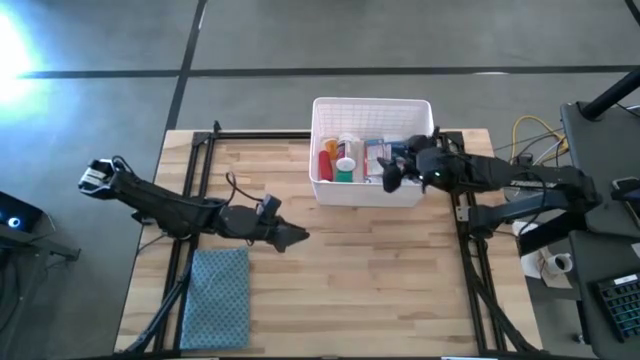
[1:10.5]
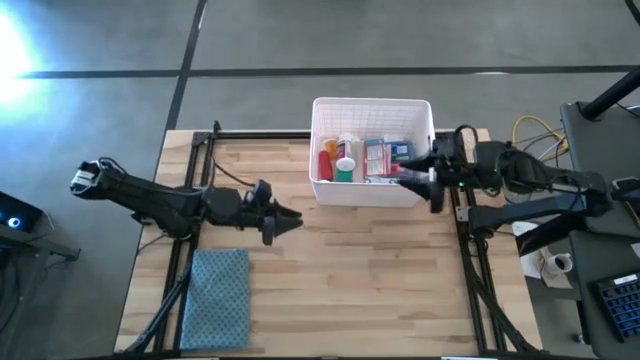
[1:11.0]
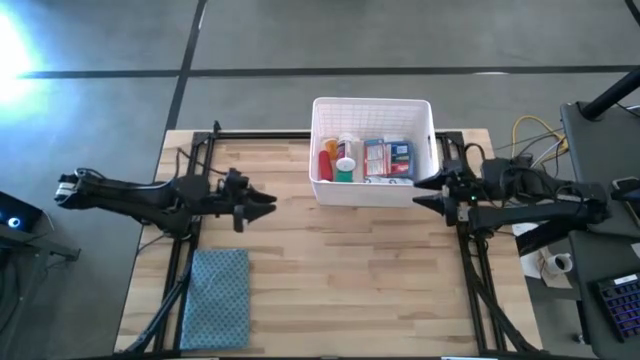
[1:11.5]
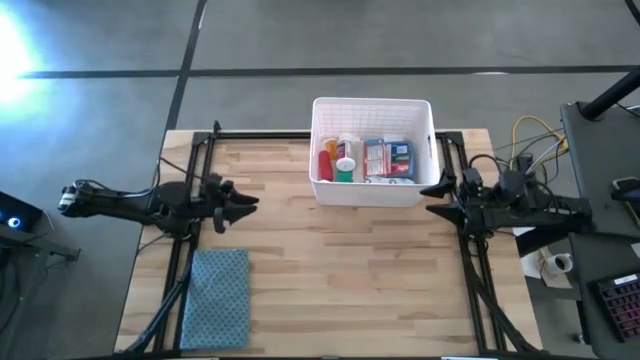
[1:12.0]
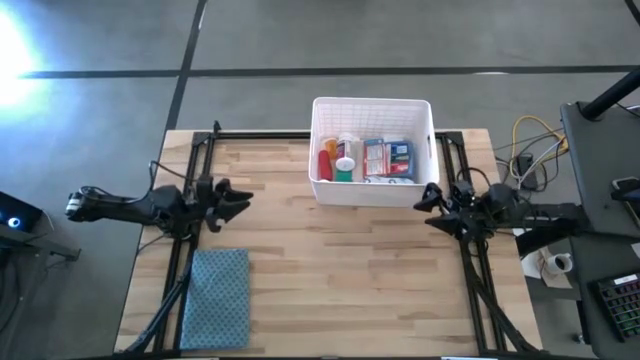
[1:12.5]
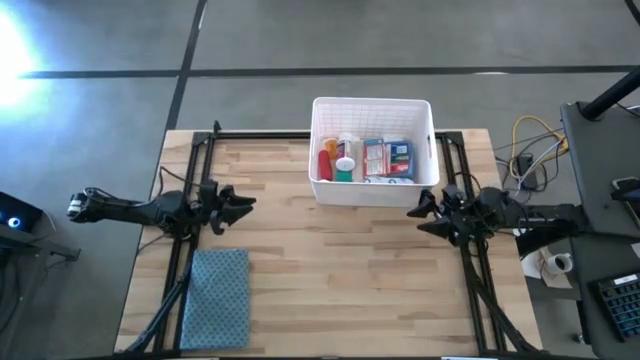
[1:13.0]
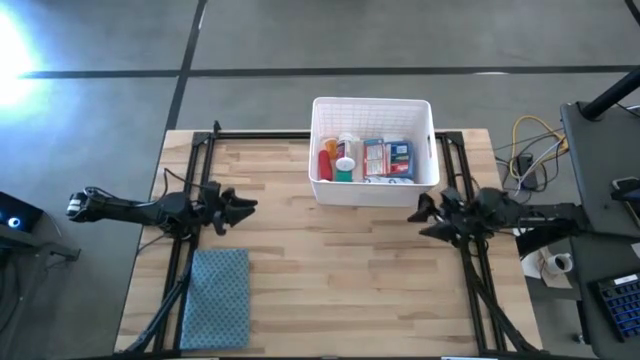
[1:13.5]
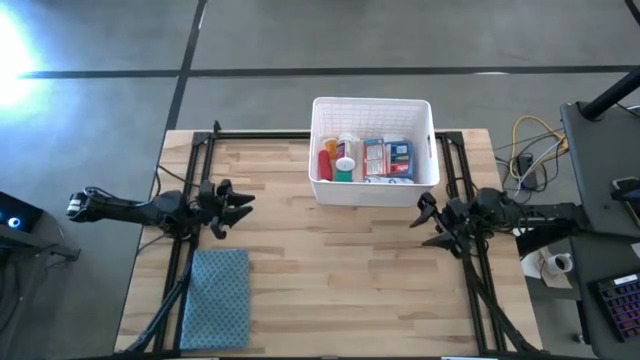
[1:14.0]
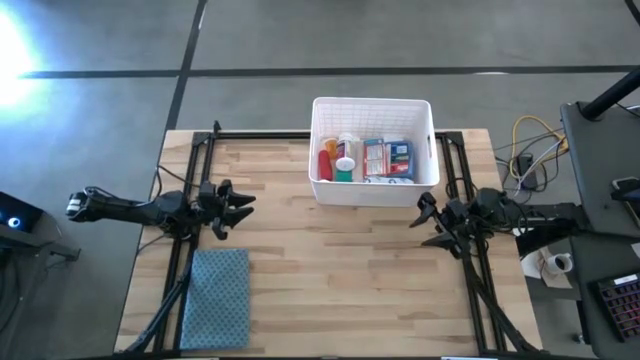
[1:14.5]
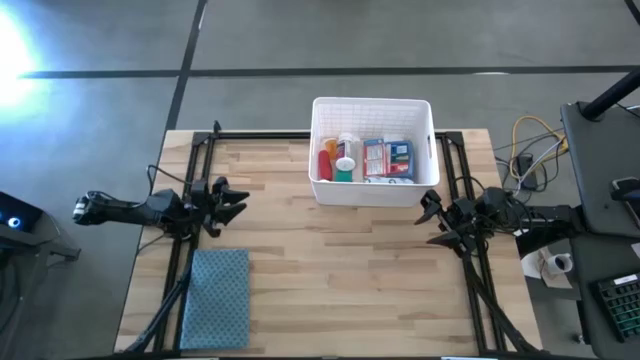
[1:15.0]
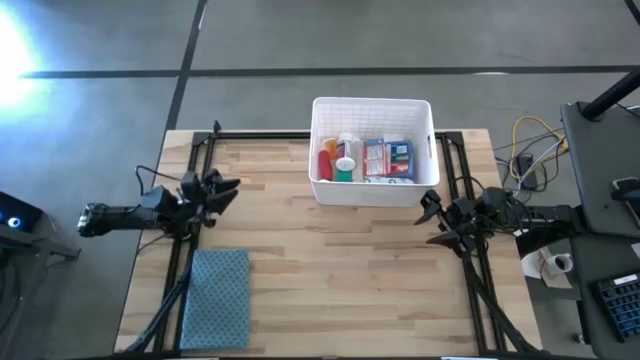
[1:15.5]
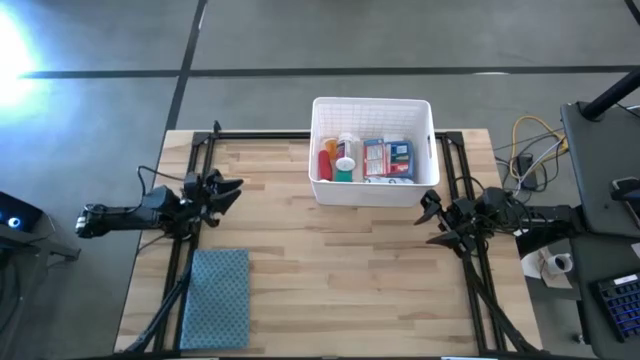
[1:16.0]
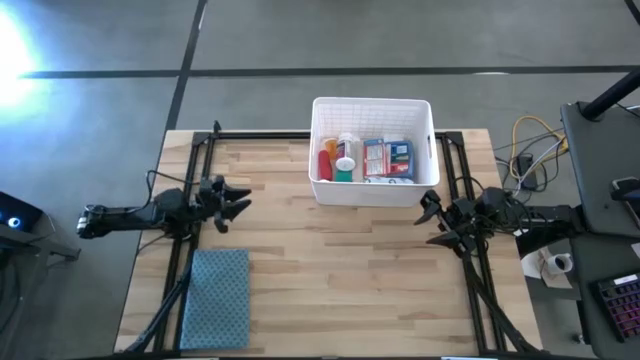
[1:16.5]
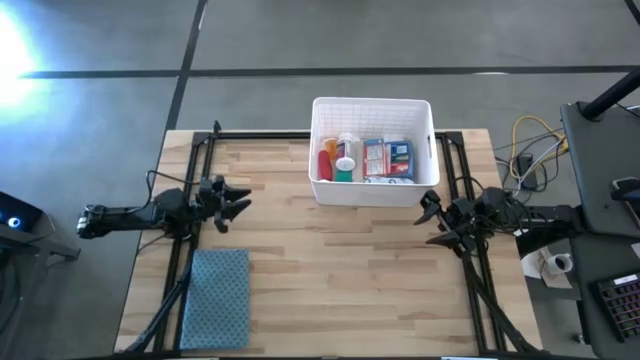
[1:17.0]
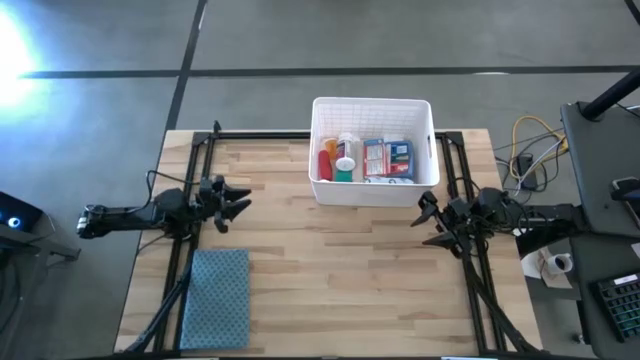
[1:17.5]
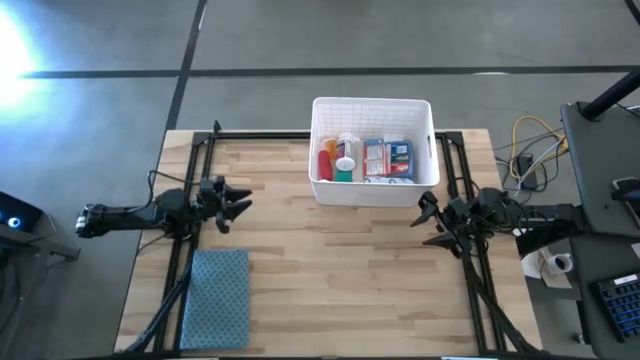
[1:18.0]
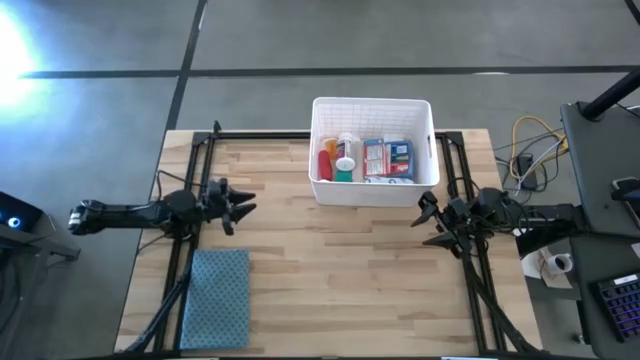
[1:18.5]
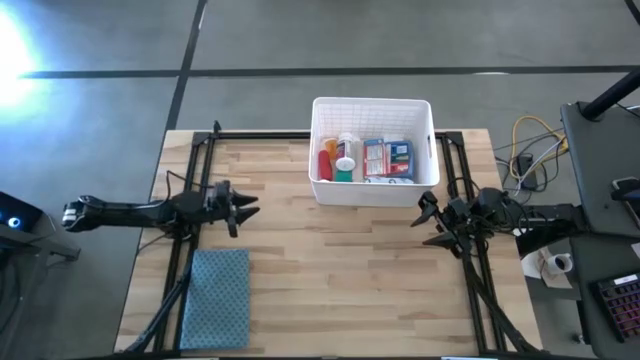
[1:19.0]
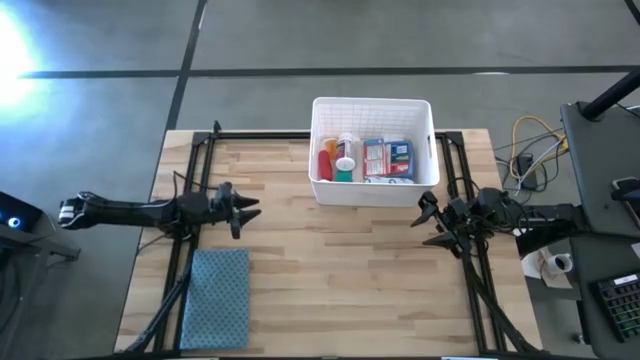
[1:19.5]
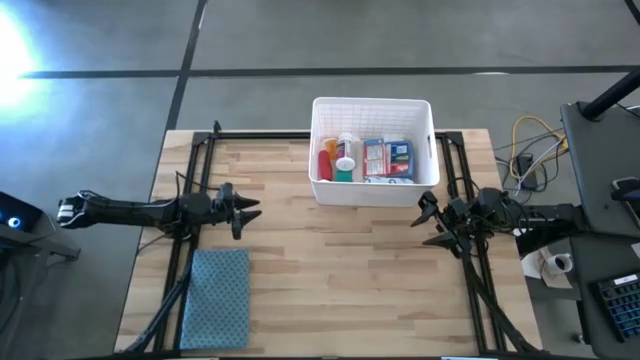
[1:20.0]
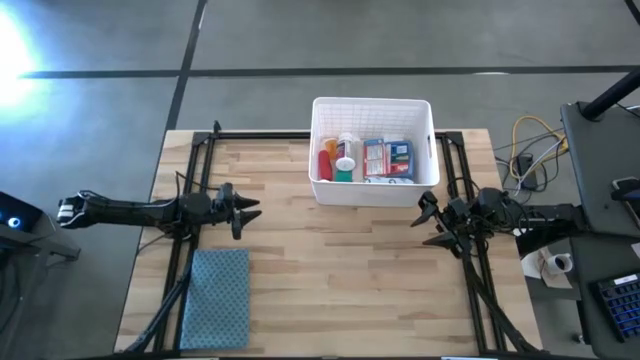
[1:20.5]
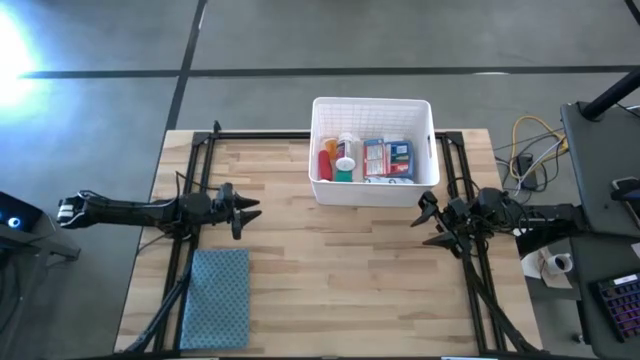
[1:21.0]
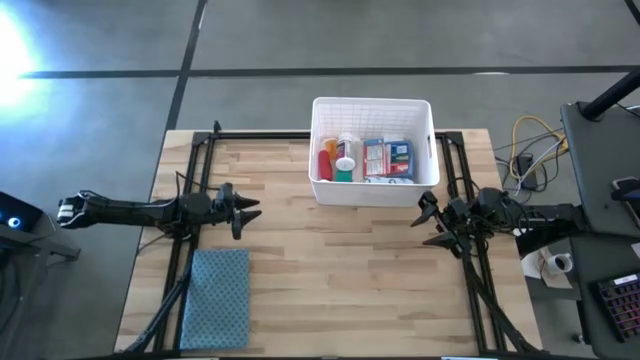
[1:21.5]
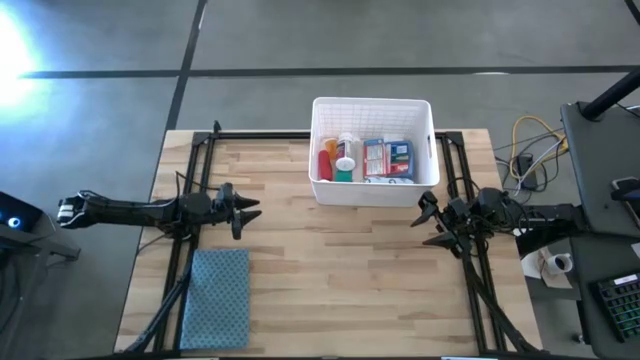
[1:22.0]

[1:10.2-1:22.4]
Task: Pick & place medical supplies in basket/bin
Return to Home Position

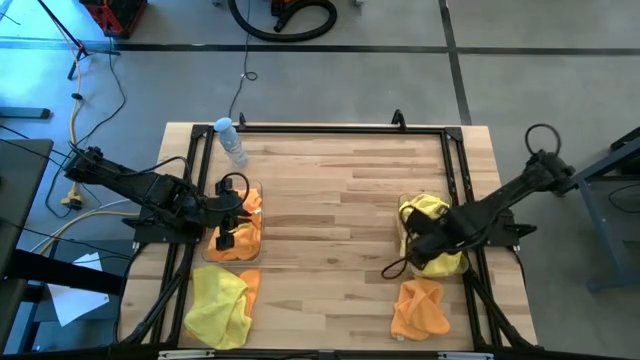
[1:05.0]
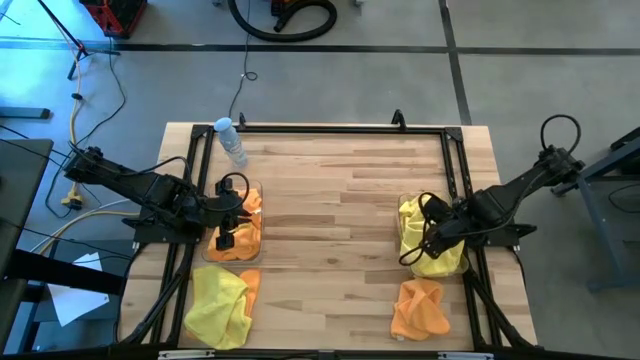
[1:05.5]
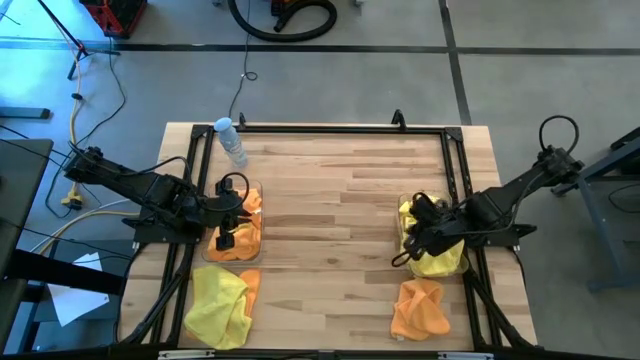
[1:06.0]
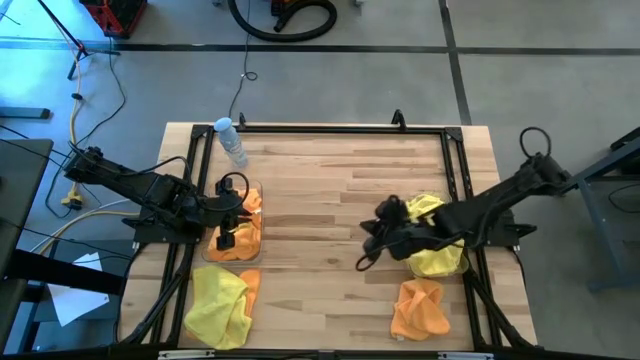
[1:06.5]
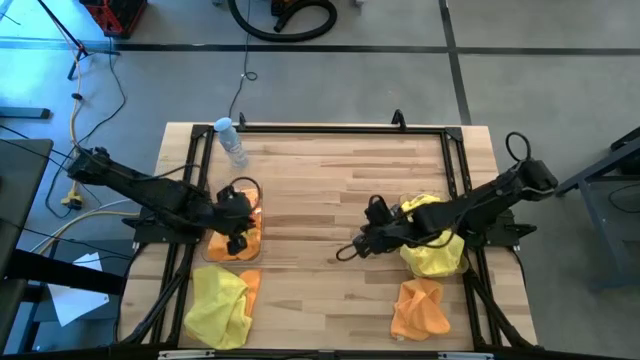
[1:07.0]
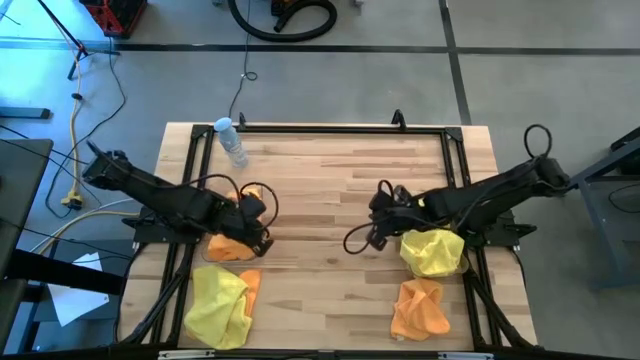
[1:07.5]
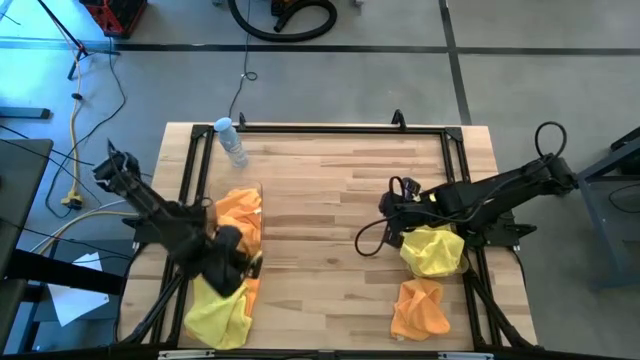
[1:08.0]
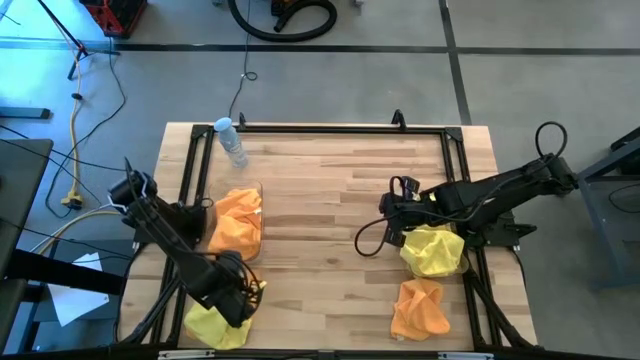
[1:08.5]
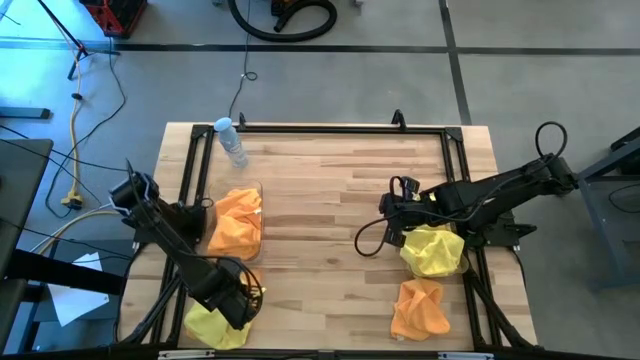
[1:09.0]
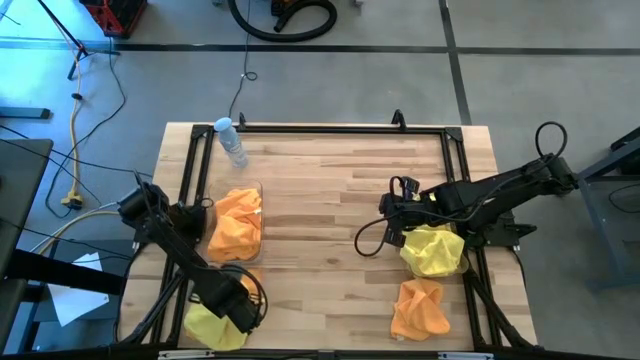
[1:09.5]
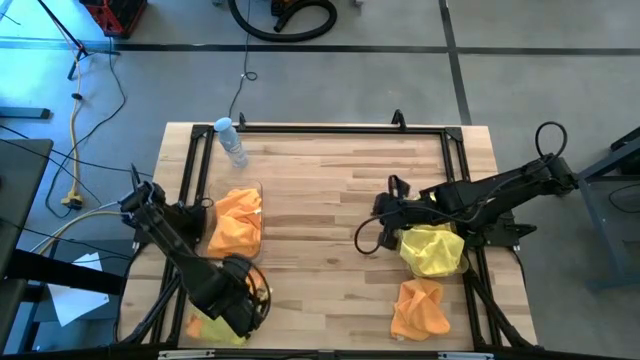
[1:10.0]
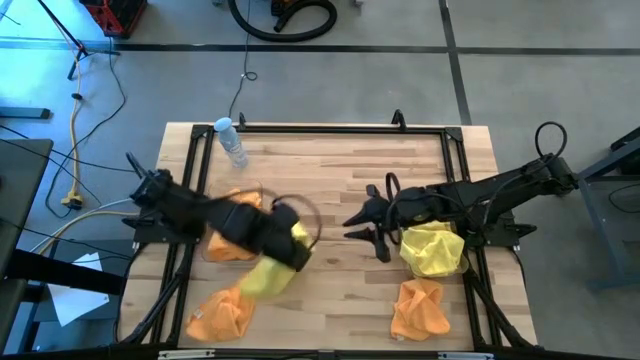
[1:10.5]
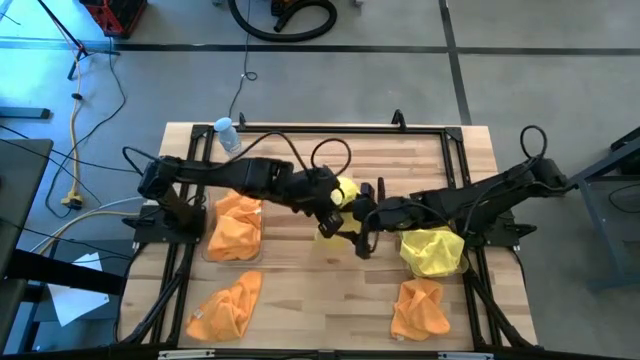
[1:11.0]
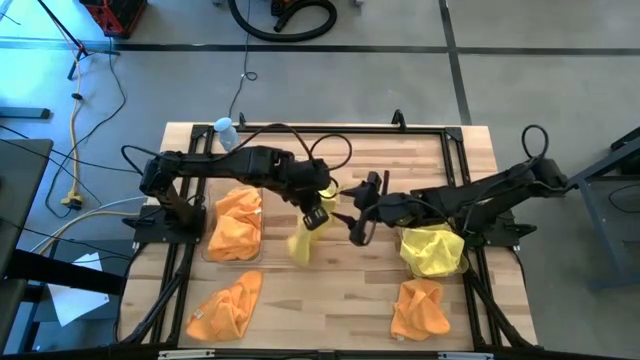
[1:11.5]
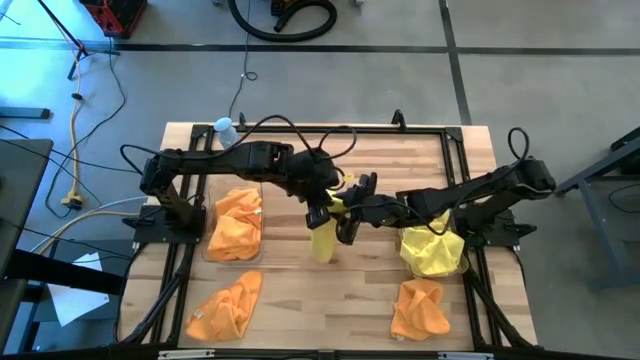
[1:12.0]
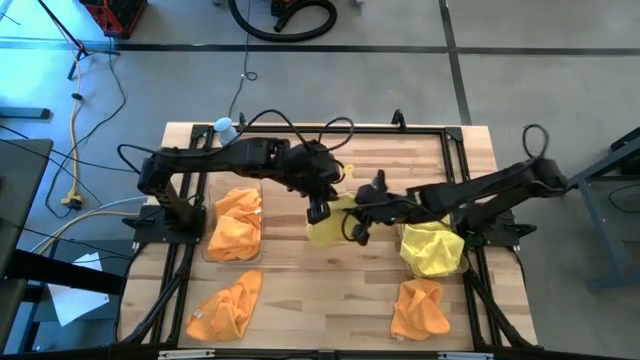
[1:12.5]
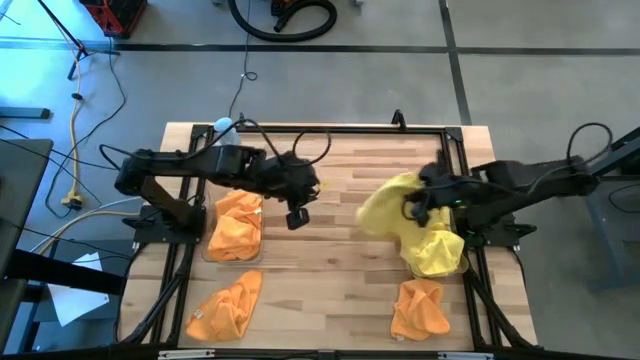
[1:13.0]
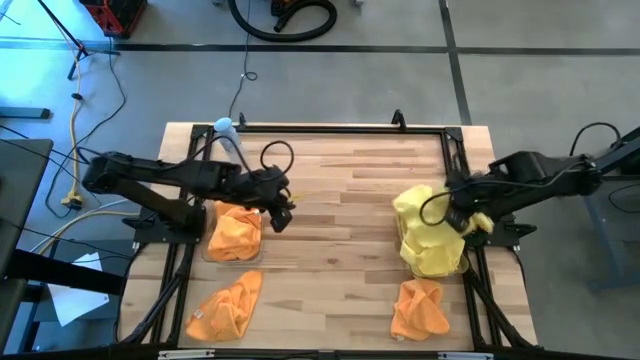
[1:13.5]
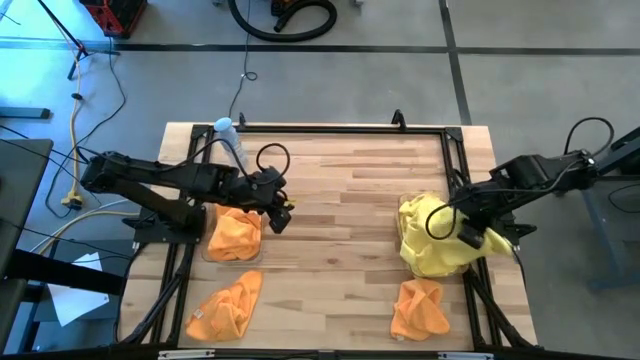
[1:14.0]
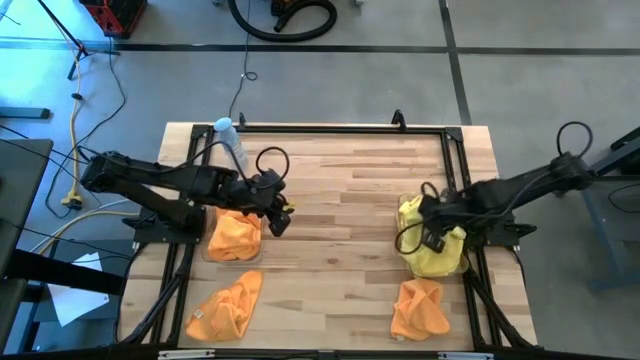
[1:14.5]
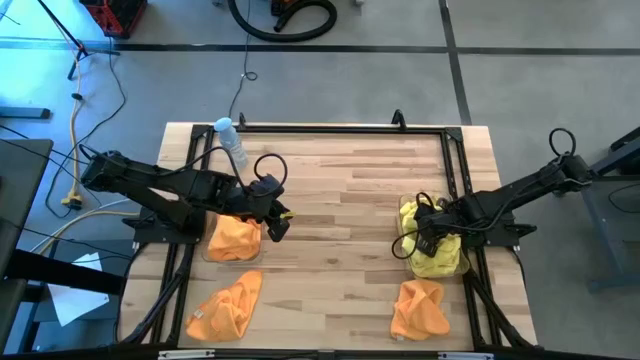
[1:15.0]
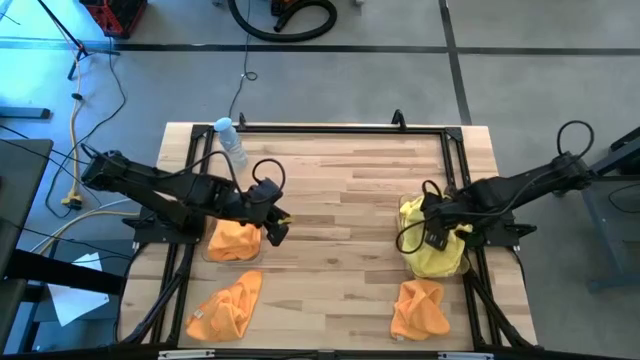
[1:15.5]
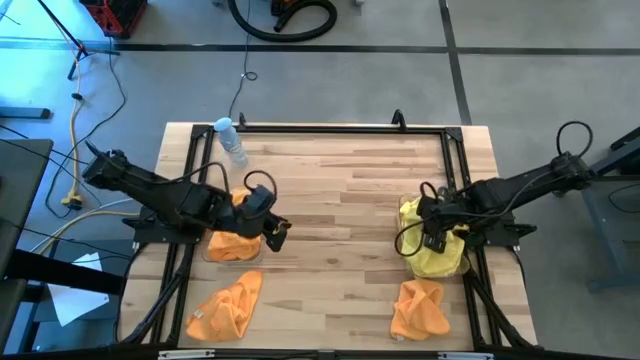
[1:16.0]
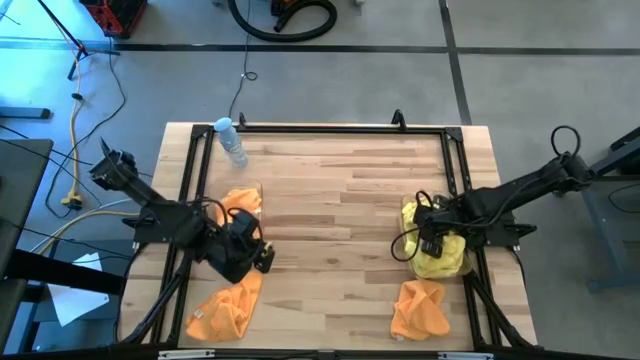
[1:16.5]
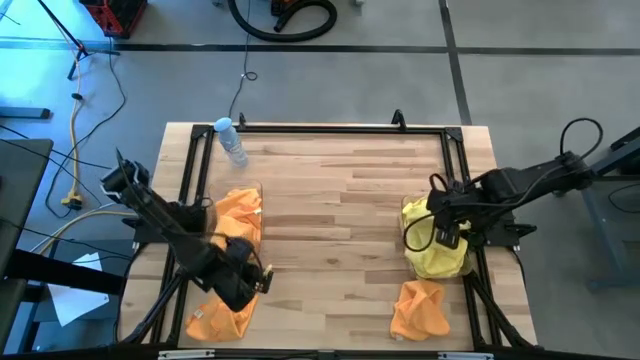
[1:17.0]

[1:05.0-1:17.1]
Task: Sort microfiber towel by color & place in baskets
Put the yellow towel into the right transparent bin
